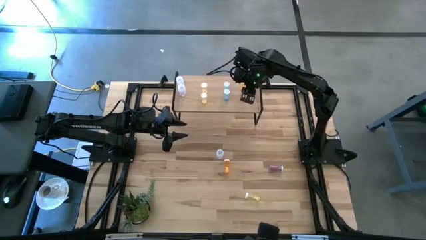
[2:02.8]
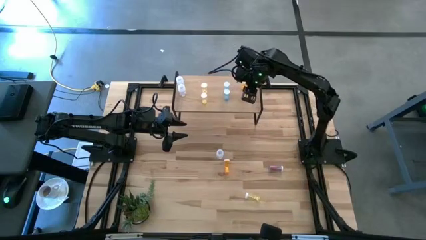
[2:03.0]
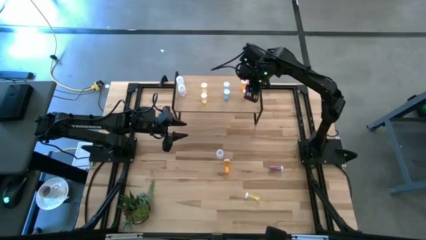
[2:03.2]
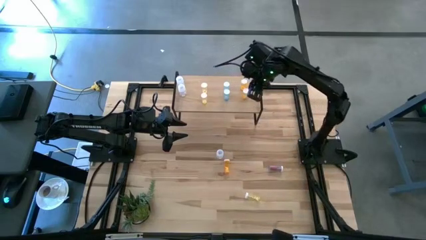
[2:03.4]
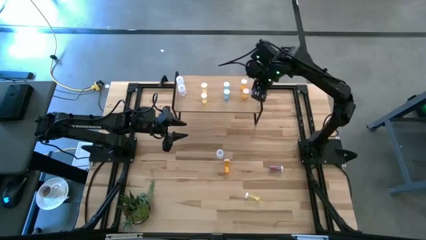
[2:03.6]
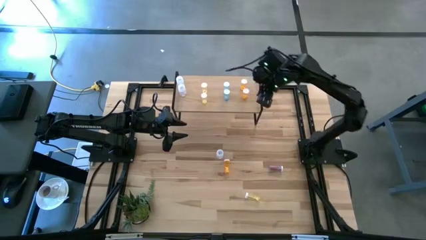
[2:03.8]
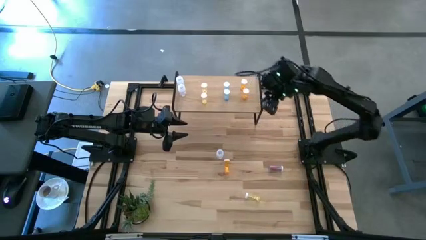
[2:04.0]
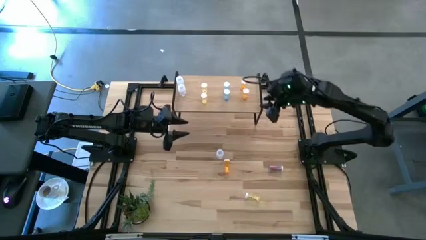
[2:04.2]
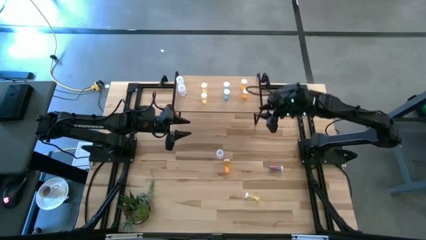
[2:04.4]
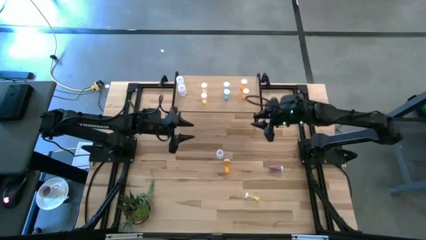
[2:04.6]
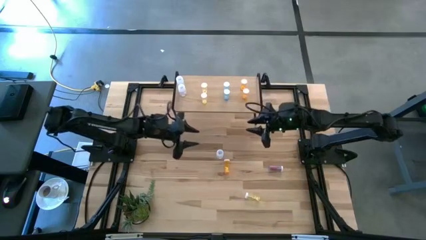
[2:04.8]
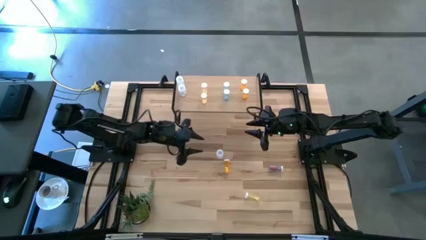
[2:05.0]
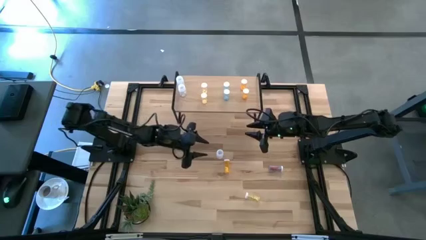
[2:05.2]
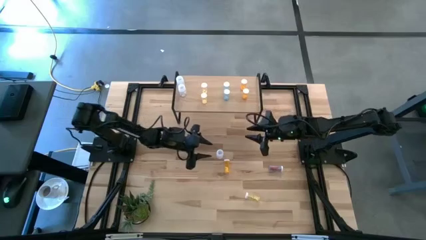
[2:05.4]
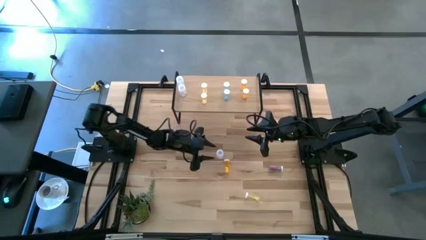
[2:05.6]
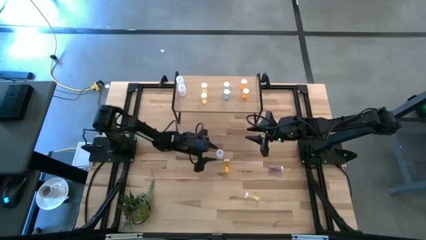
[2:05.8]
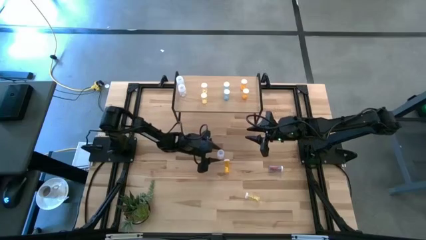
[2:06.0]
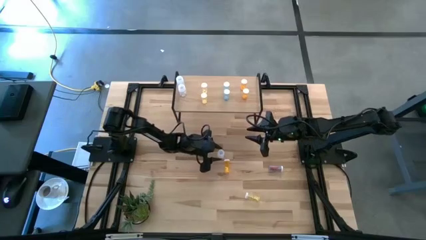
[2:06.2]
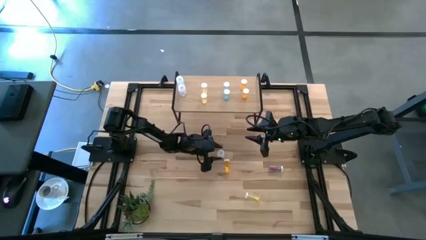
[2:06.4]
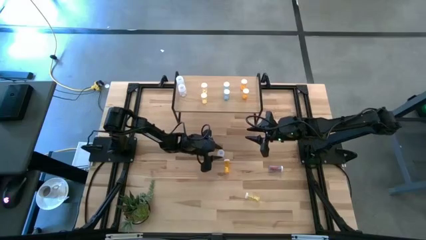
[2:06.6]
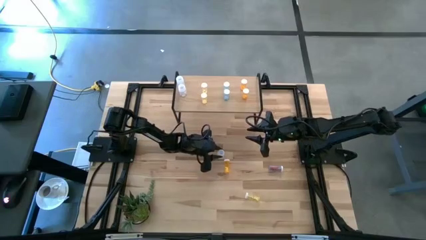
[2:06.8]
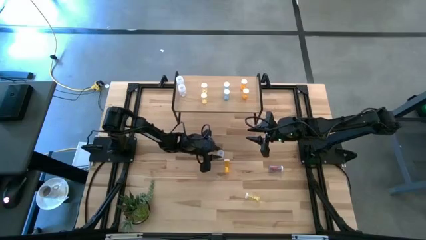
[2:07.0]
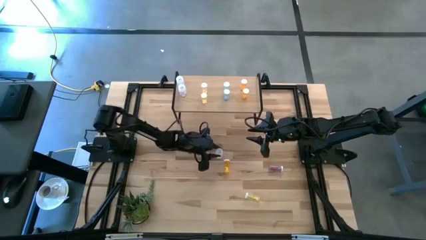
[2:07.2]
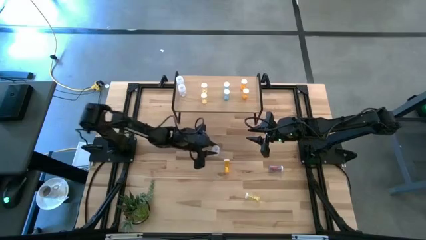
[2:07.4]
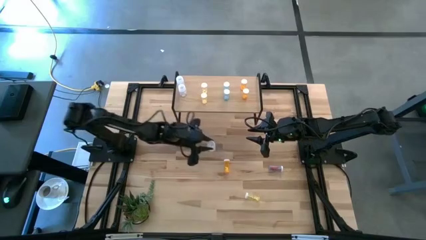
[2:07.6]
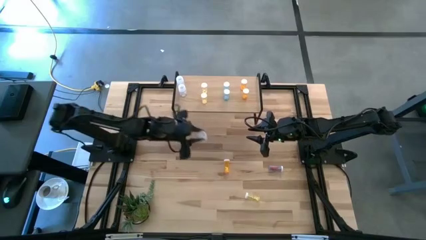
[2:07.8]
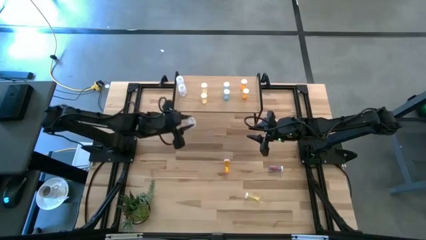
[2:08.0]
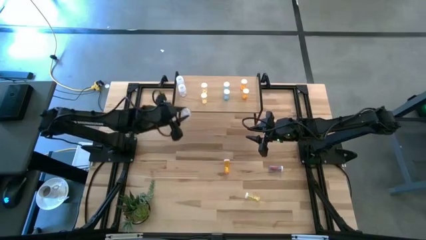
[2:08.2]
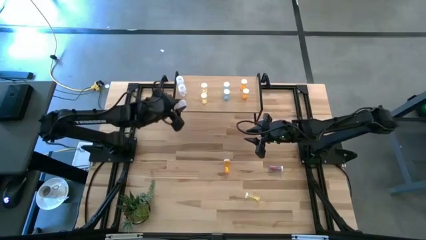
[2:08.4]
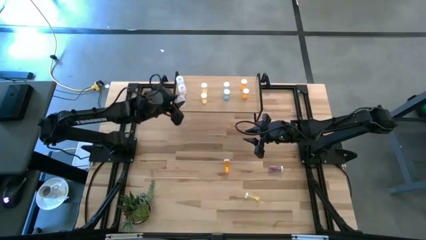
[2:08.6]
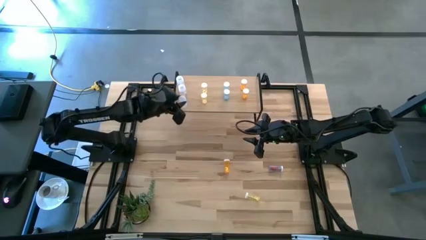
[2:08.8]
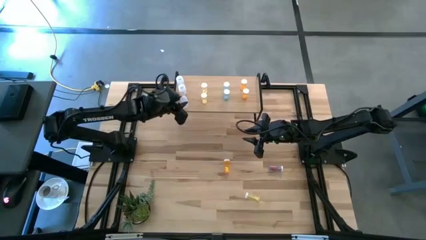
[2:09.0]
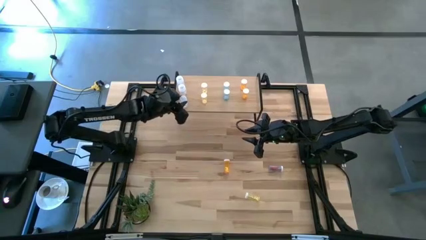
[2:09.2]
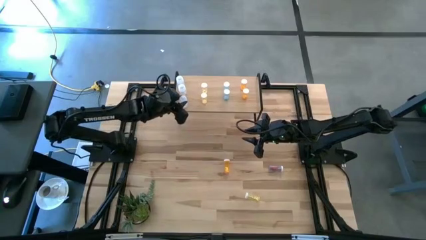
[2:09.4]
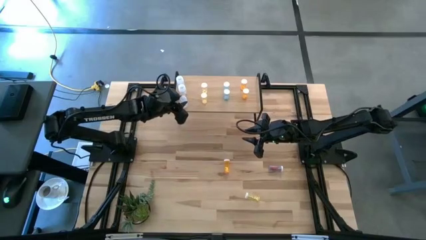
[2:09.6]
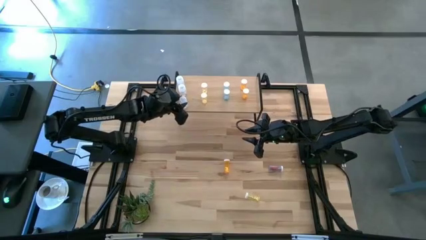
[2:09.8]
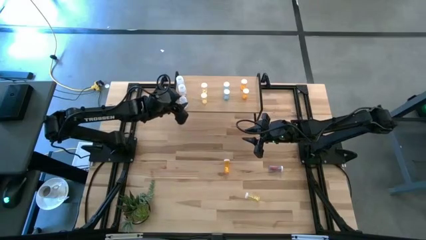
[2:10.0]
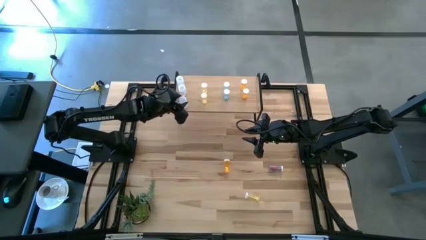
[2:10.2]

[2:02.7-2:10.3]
Task: Pick and place medicine bottles onto shelf by color
Put the transparent pill bottle on the shelf aligned with the other transparent pill bottles

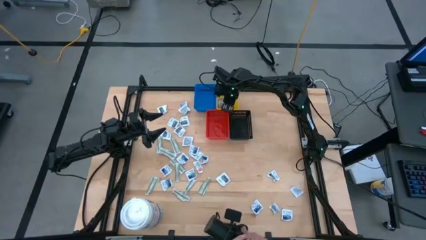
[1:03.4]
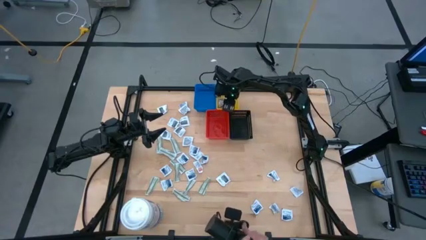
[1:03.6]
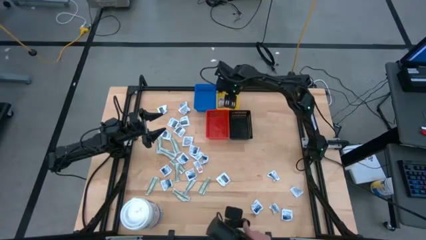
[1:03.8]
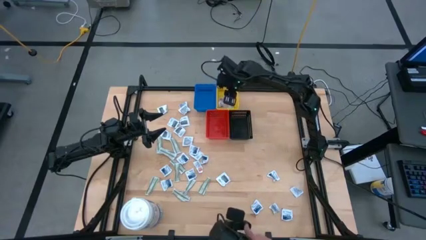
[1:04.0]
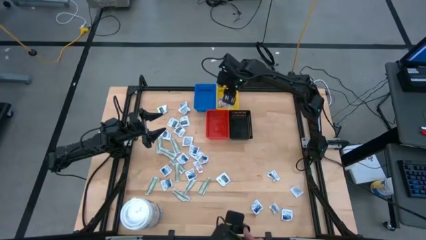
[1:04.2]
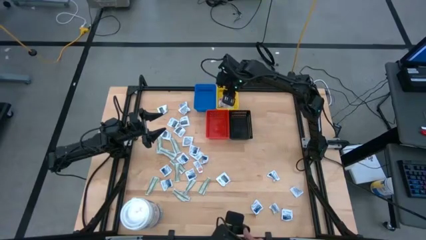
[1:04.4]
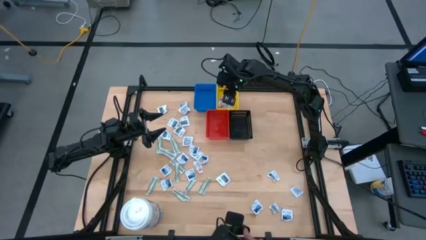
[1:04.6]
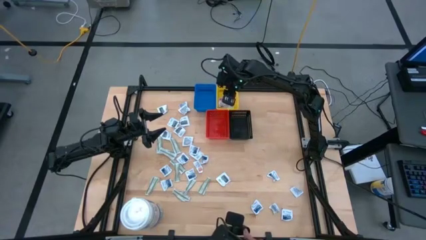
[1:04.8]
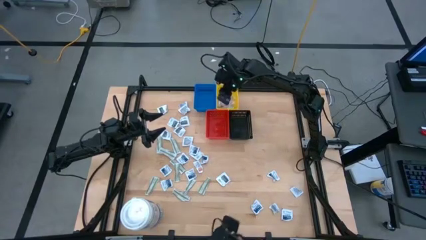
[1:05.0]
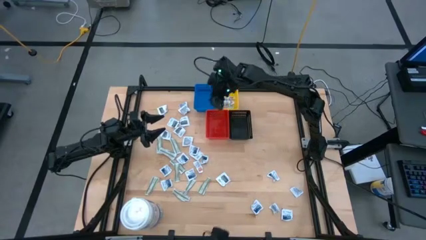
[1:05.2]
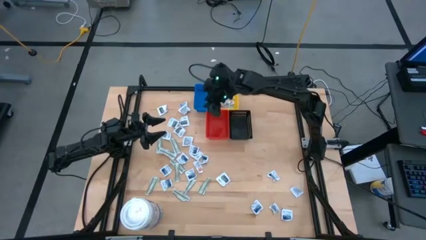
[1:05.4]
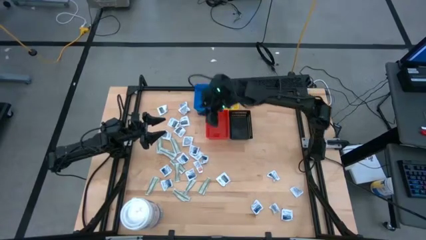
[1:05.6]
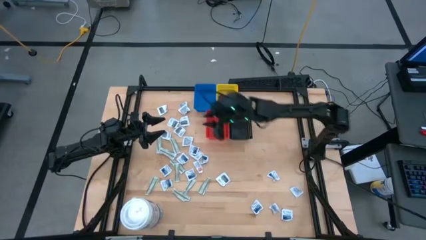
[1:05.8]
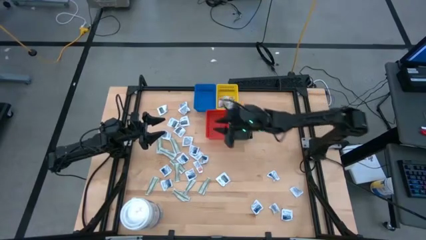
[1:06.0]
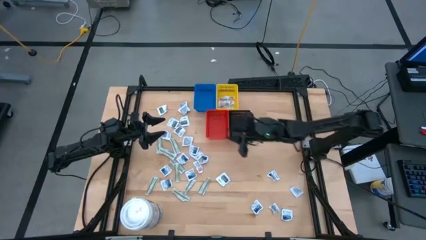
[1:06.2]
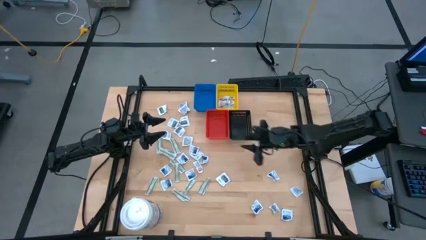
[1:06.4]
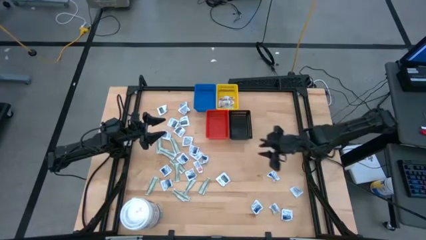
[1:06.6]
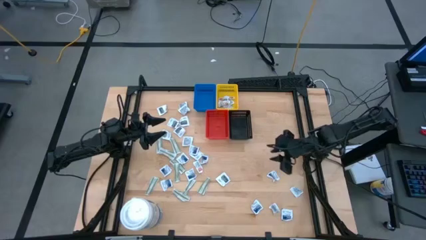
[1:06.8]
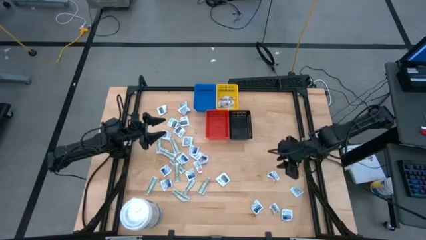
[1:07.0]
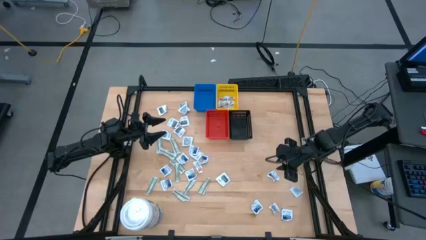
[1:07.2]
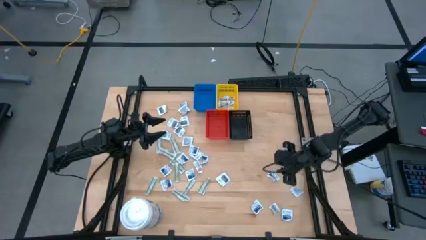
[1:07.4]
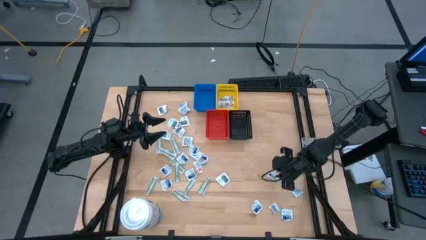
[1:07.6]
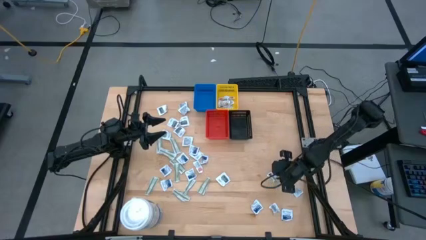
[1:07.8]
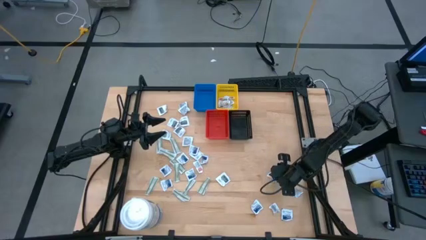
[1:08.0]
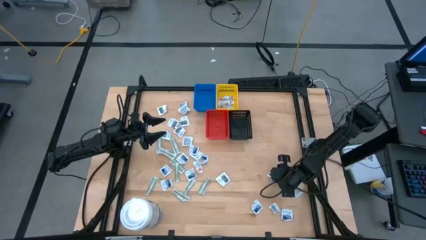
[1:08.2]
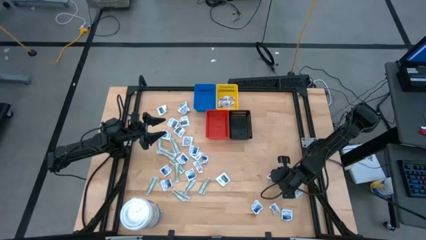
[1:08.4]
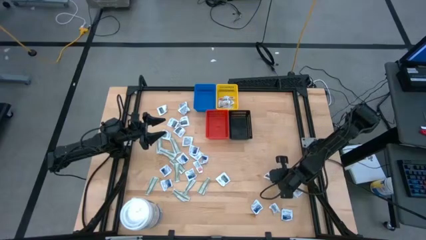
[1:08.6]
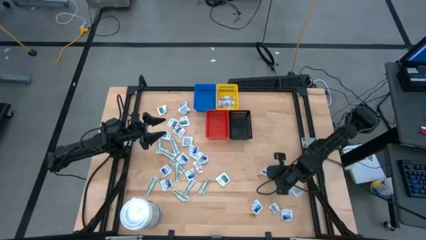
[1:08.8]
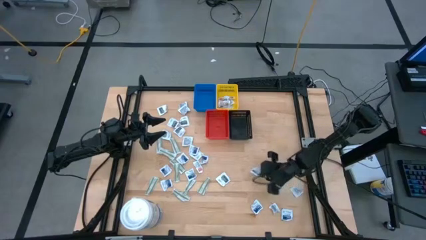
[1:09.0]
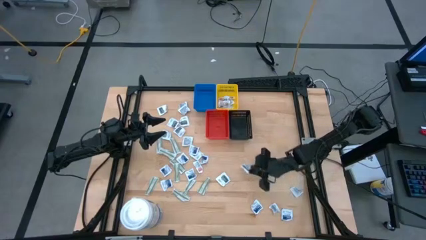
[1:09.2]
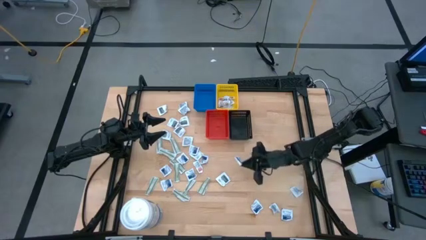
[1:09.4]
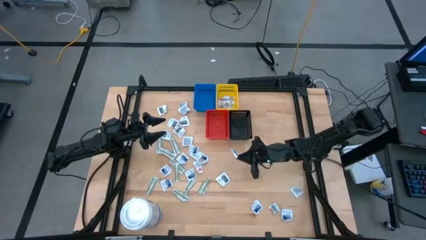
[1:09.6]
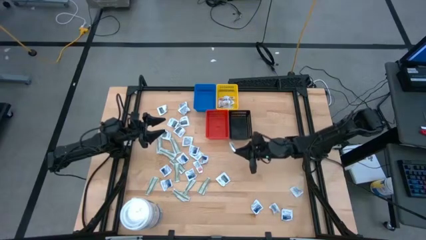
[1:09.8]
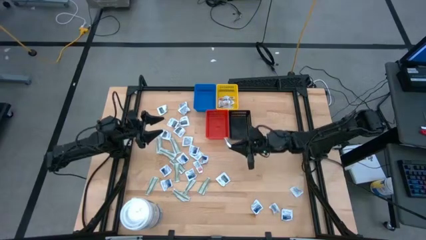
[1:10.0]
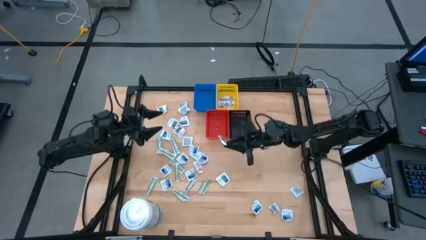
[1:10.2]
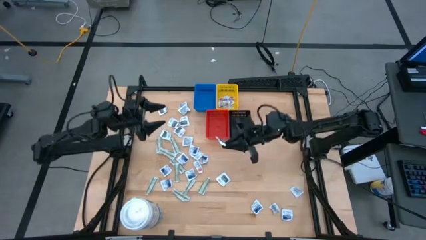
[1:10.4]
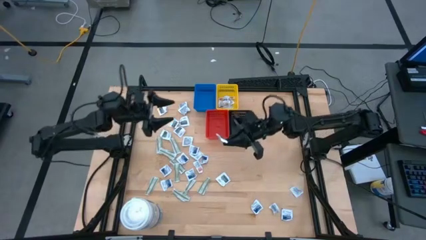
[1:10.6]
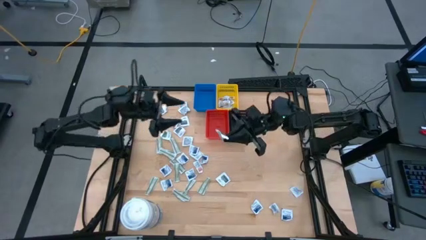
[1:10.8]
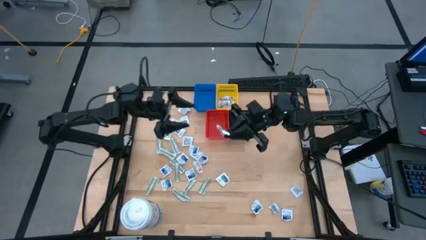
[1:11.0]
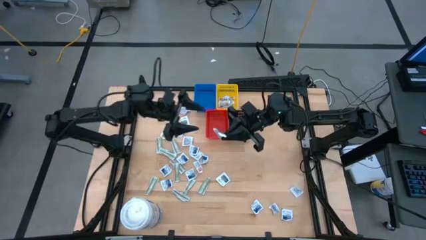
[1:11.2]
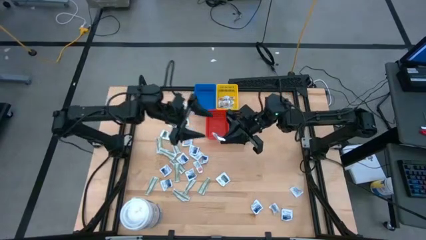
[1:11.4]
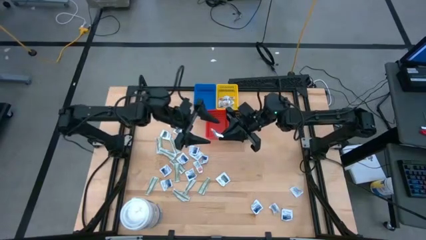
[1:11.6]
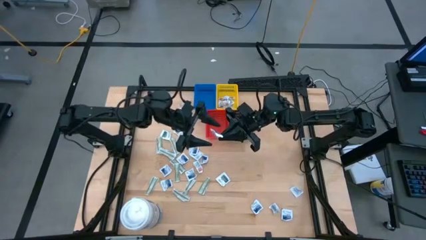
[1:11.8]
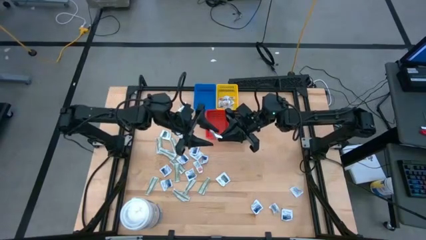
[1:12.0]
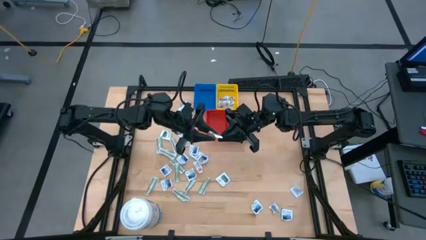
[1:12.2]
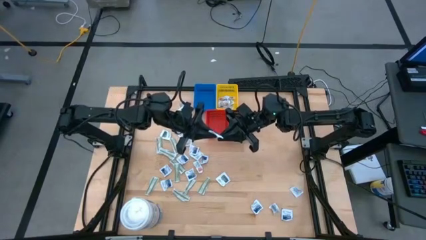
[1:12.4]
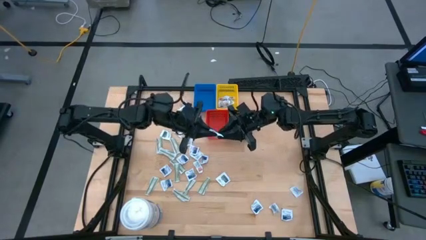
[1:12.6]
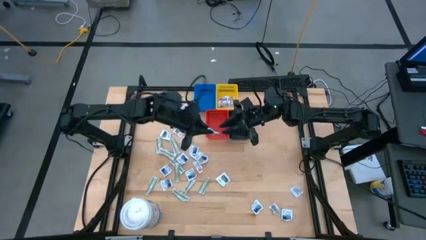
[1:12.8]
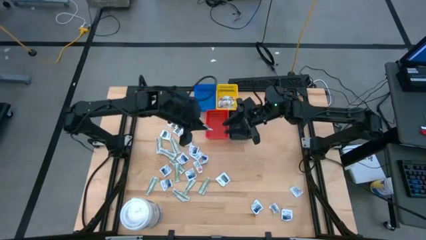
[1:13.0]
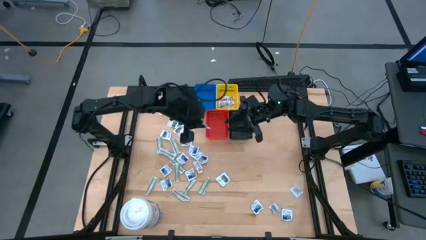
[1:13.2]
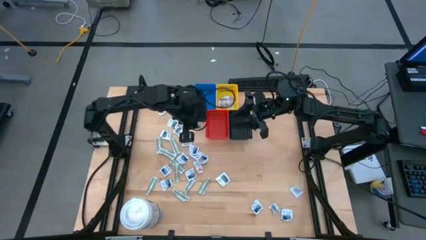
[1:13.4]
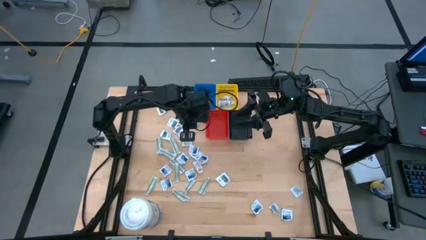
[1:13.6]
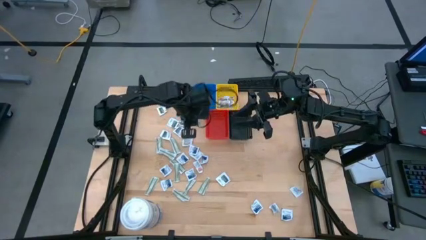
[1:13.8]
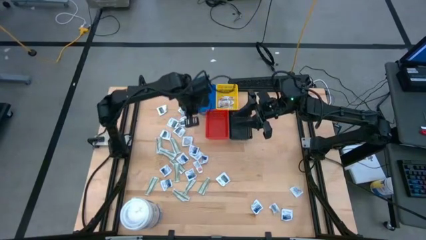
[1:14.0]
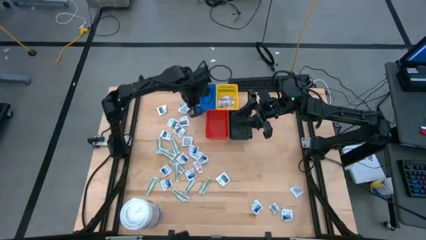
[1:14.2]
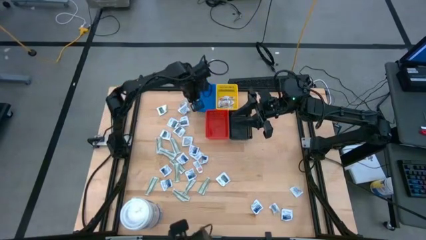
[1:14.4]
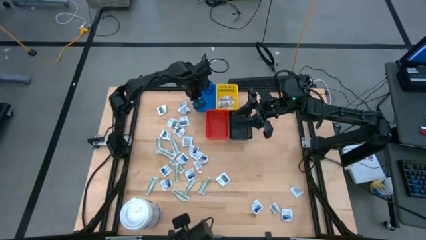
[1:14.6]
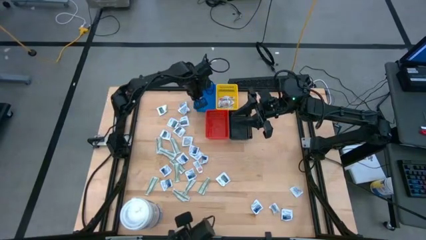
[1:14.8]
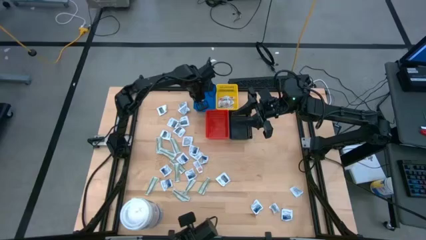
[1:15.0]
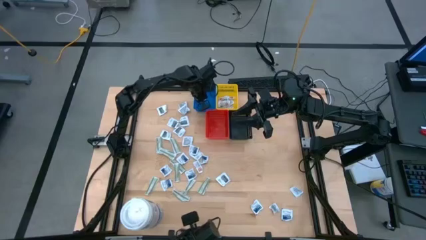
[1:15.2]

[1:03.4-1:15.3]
Task: Pick & Place First Aid Supplies
Put the alcohol pad into the blue bin
